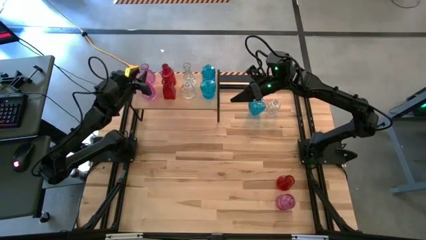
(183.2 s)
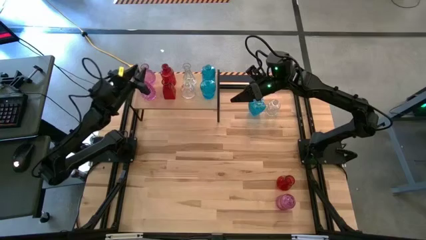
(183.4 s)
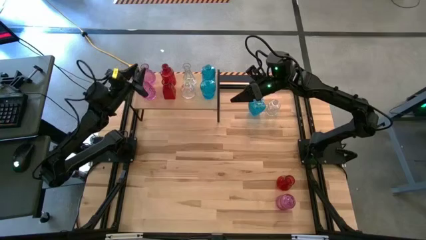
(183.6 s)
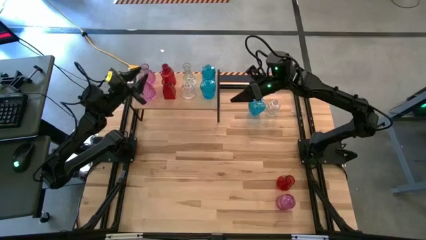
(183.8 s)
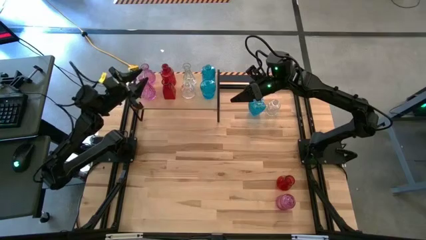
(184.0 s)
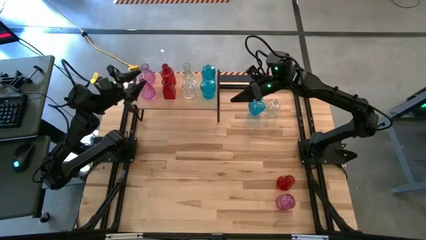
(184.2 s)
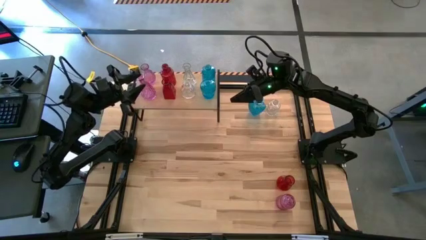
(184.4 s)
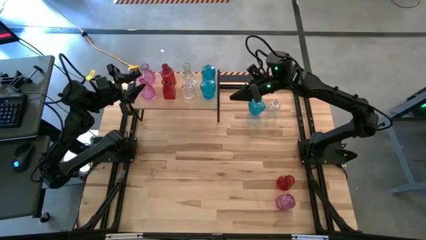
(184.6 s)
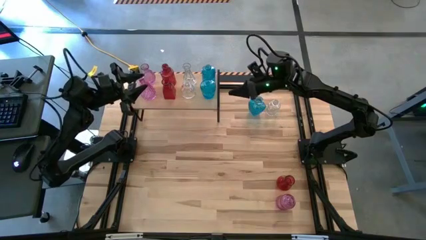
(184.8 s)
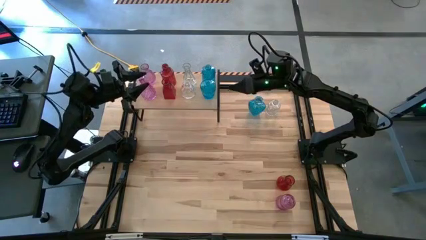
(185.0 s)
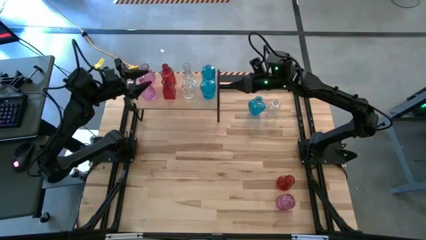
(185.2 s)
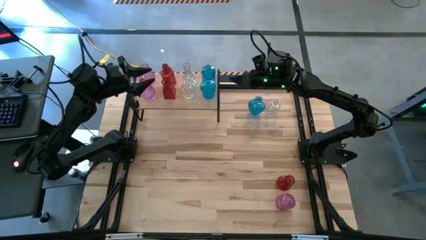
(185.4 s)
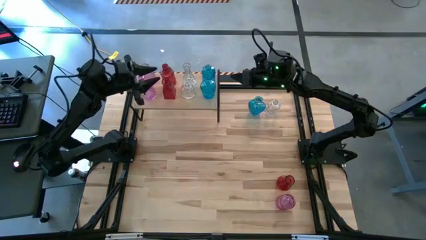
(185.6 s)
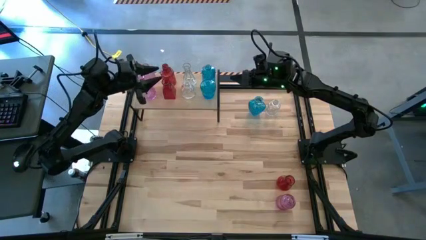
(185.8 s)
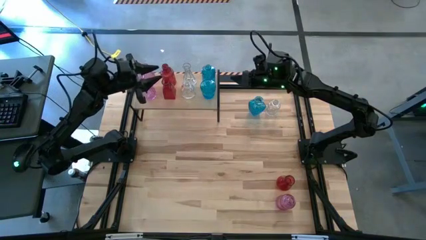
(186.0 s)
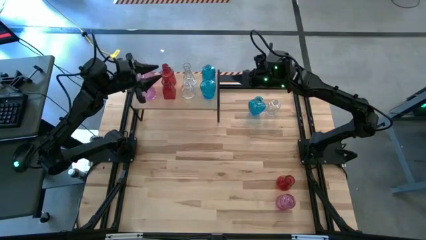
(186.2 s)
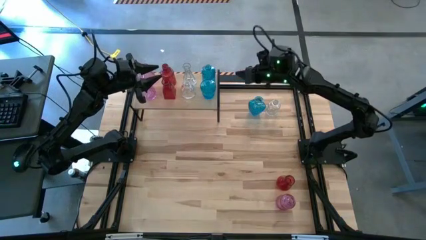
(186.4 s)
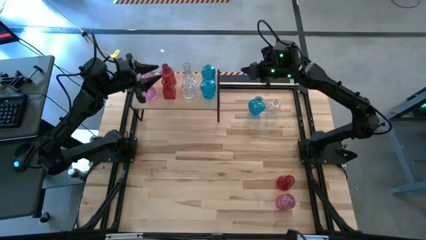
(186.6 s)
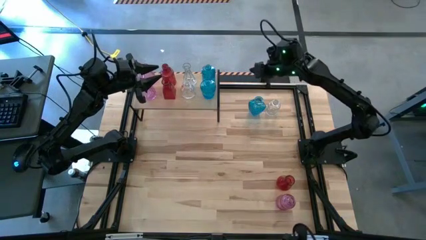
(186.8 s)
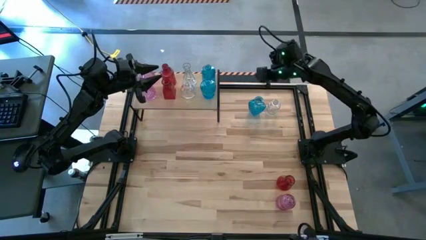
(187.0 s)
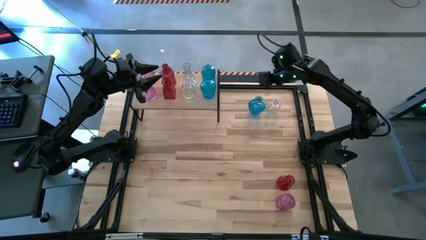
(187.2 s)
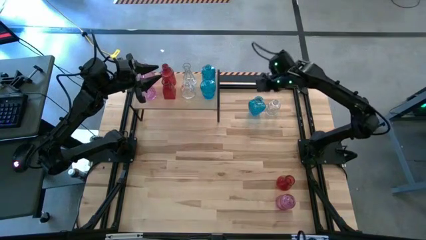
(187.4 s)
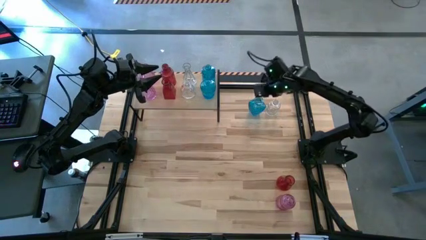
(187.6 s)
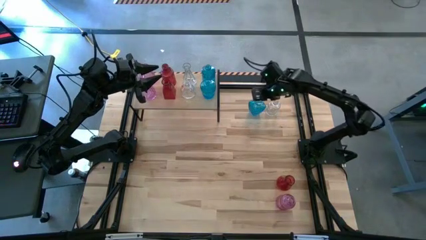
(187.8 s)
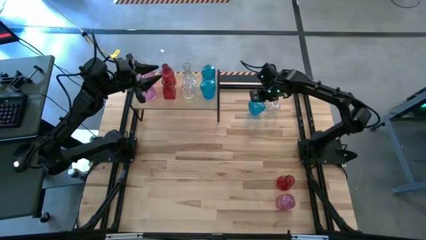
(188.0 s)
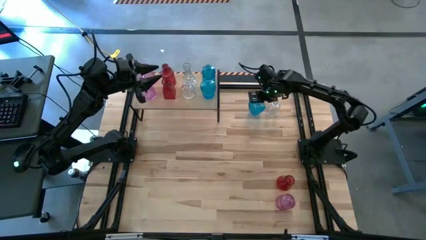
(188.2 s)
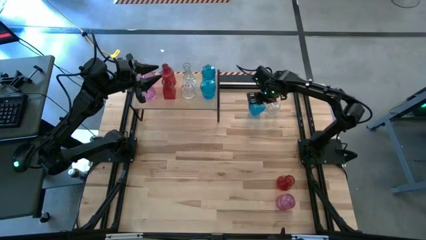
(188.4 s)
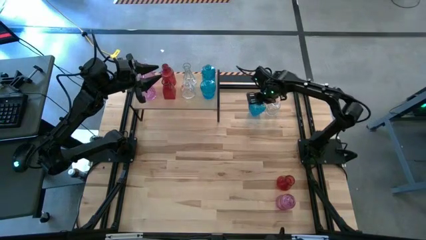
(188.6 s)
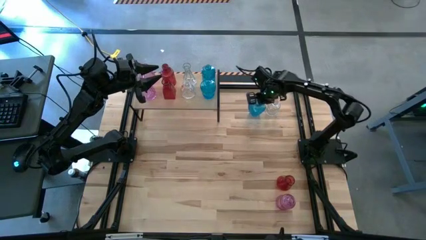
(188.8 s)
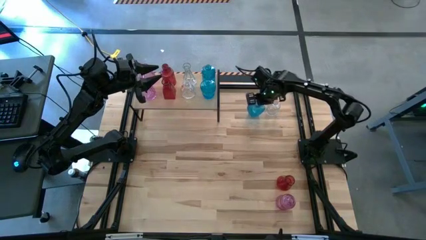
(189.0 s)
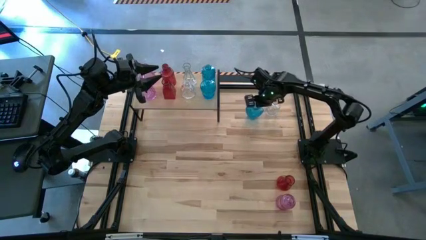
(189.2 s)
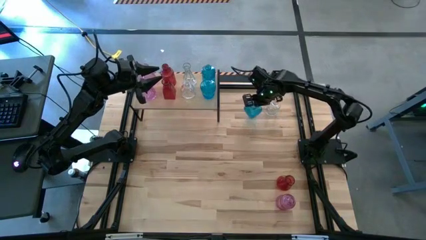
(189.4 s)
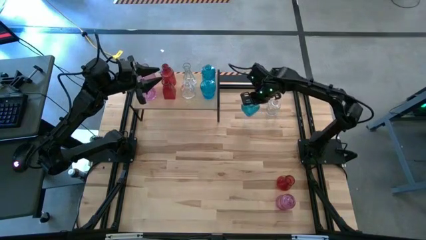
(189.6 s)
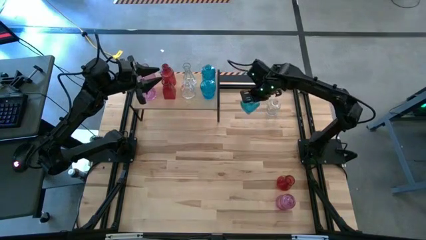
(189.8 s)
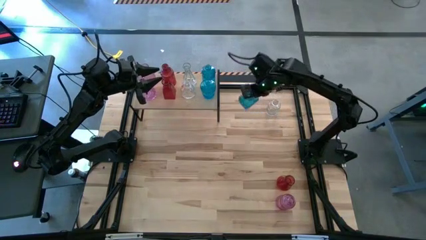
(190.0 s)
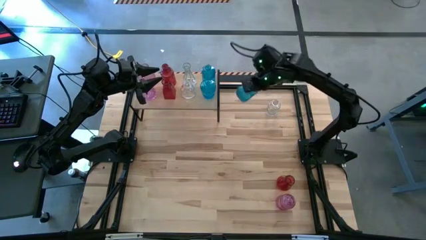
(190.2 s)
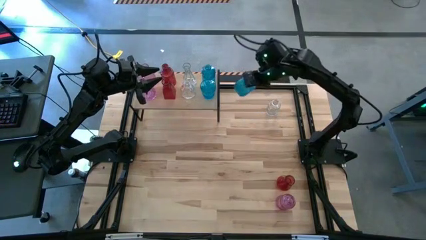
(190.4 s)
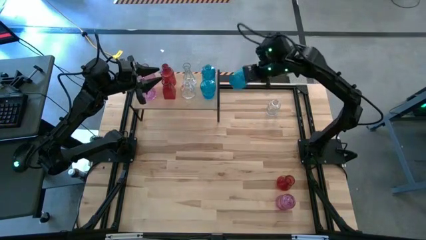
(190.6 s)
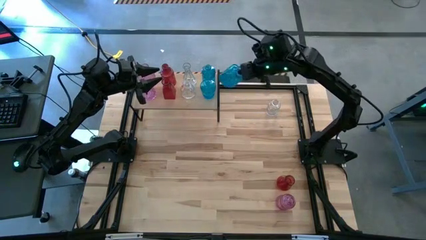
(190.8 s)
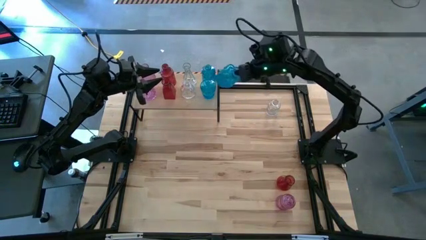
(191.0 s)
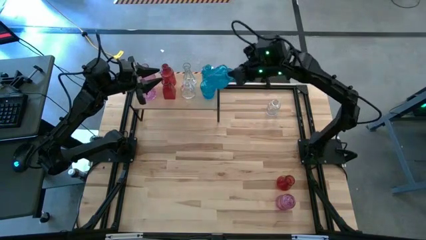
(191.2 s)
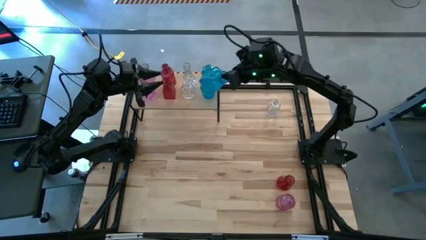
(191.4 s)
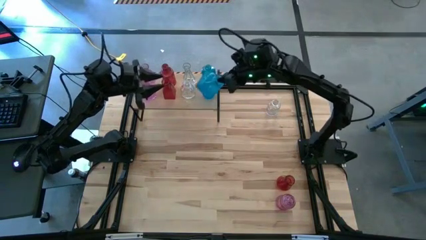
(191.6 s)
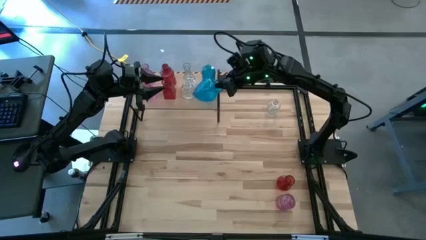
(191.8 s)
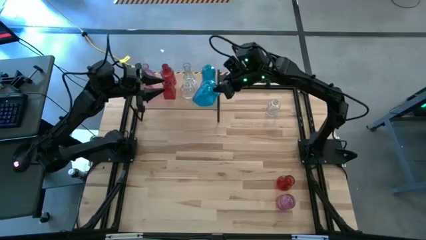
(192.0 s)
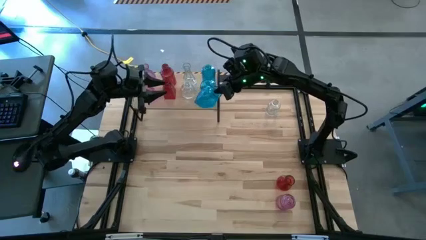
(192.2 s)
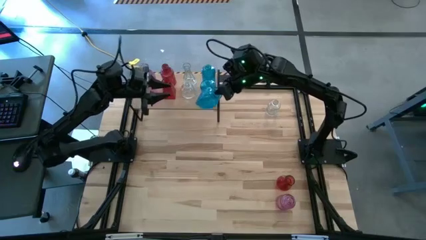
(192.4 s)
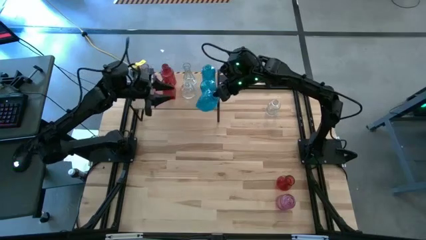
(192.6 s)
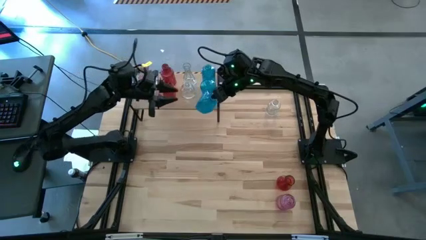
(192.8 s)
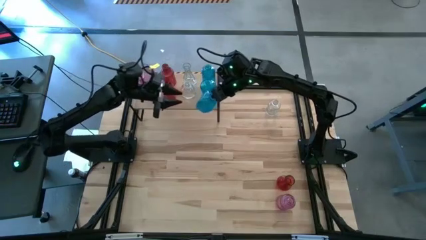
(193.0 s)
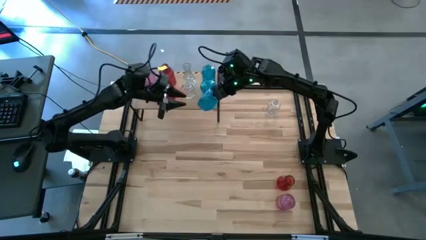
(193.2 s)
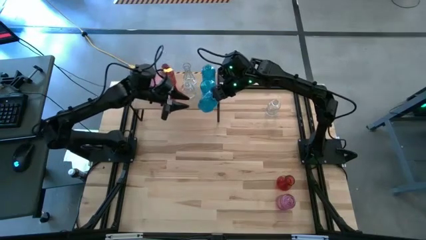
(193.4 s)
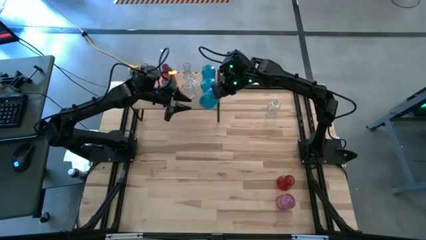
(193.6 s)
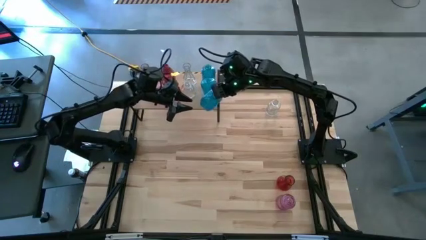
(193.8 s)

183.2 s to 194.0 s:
Task: sort vases onto shelf
Put the blue vase on the shelf aligned with the other blue vases

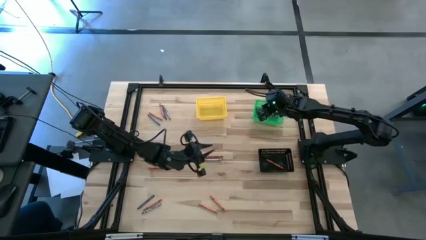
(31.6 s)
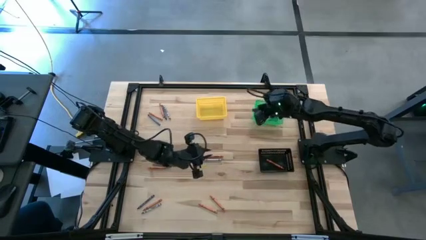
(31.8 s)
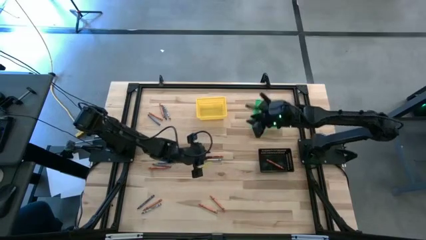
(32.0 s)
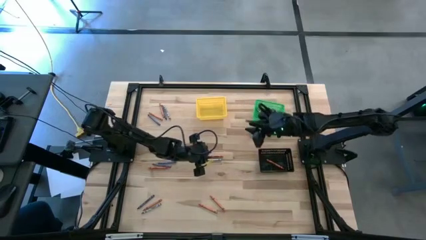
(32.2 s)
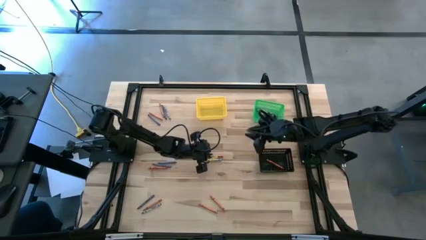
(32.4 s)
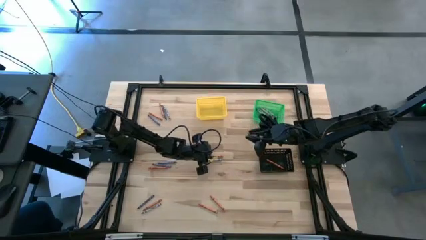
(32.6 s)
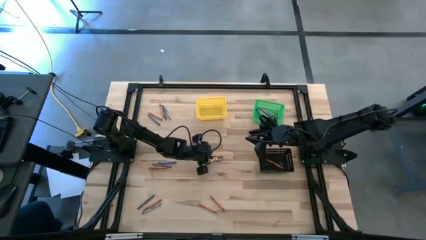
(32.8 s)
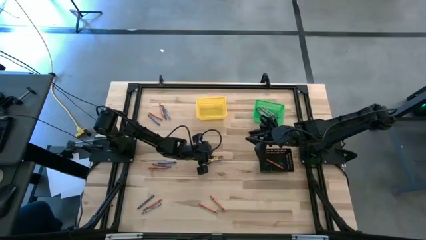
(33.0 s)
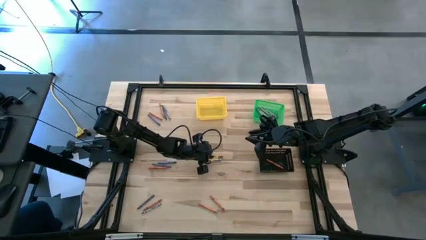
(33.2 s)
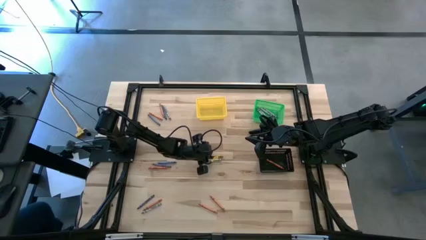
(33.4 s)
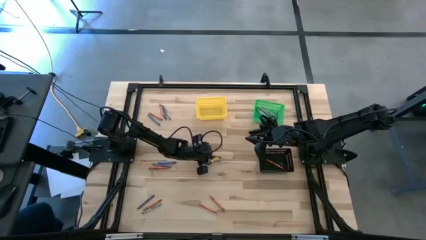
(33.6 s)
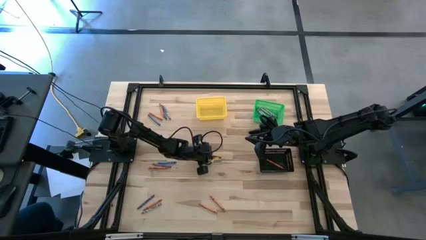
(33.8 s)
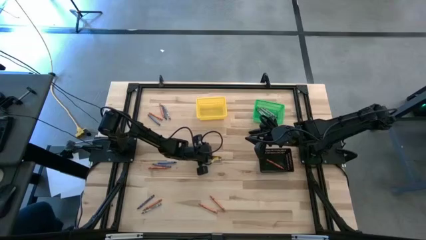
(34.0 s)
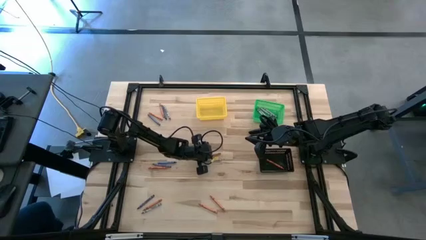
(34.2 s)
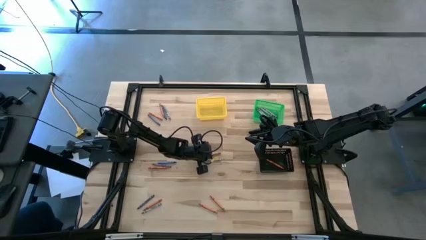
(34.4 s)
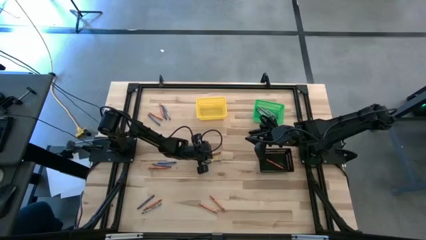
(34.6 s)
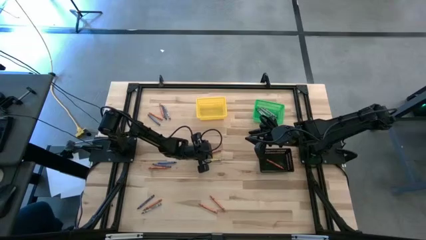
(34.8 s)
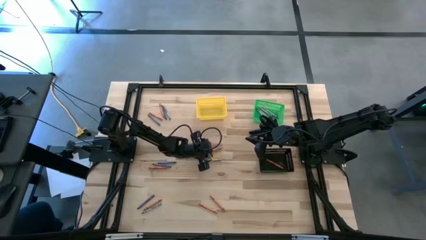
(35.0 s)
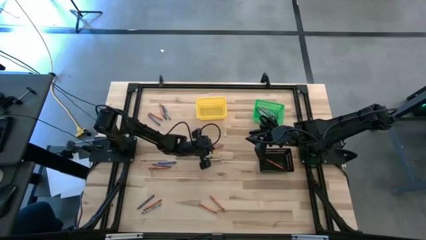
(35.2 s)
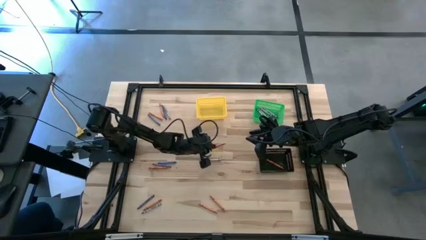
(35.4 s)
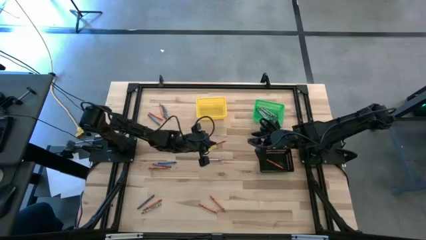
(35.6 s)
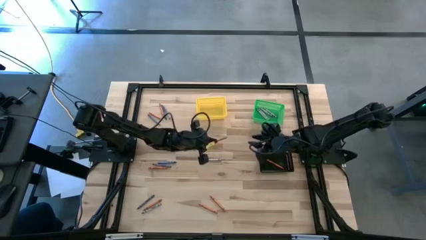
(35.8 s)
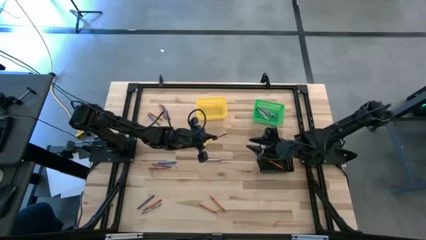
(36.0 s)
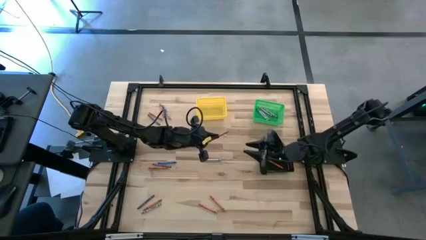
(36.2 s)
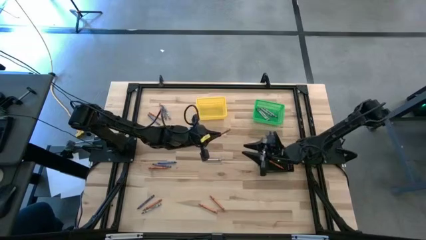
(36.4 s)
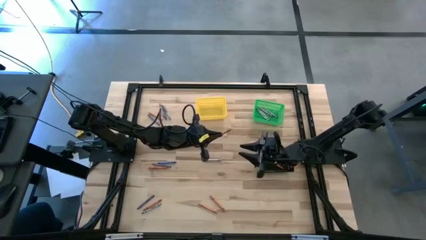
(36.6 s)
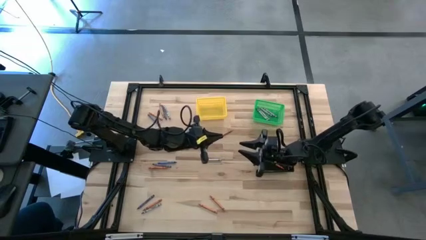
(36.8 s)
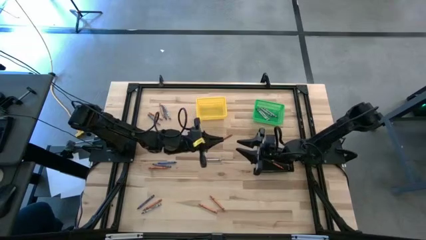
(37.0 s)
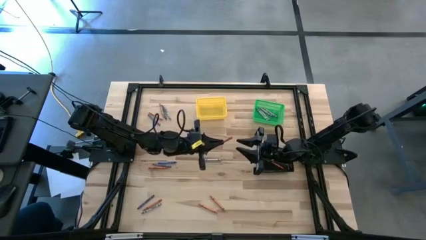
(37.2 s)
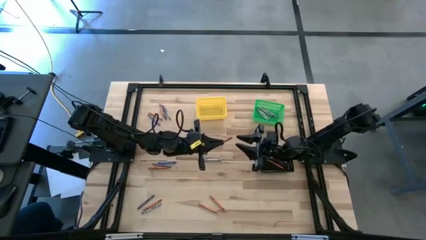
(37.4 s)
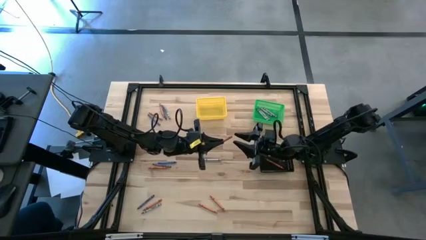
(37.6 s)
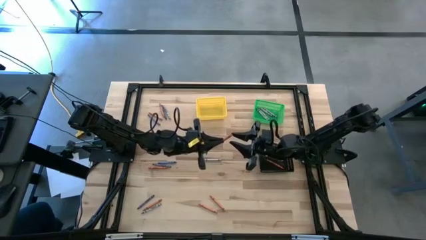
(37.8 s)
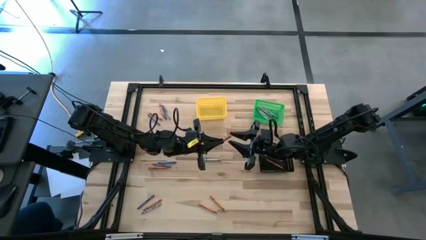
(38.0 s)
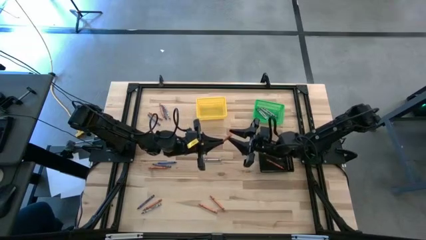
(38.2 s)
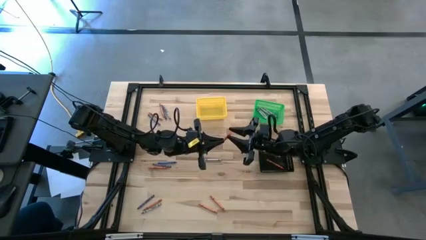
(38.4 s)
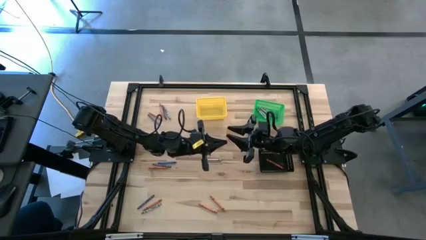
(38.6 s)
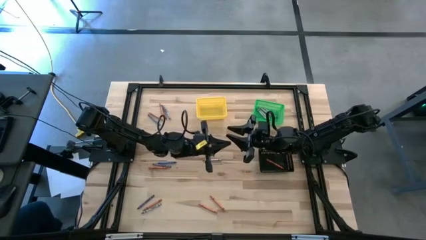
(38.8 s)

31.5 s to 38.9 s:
Task: Sort crayons
Put the orange crayon into the black basket
